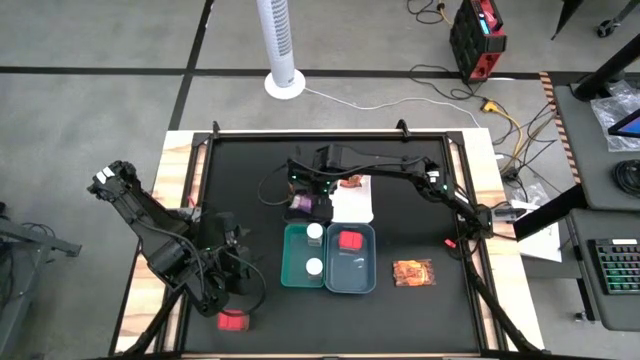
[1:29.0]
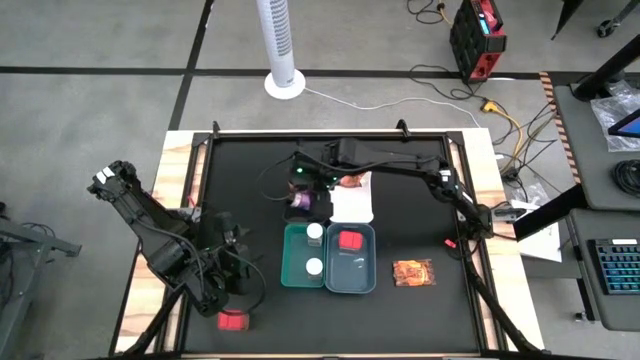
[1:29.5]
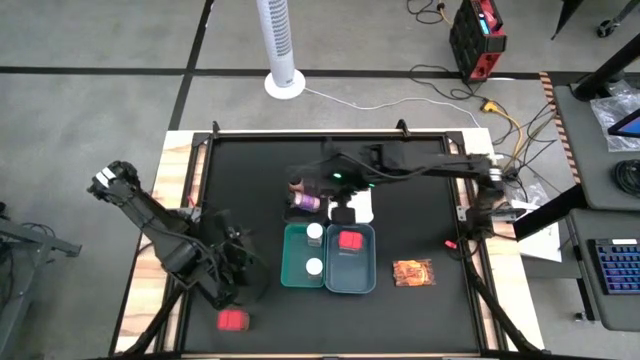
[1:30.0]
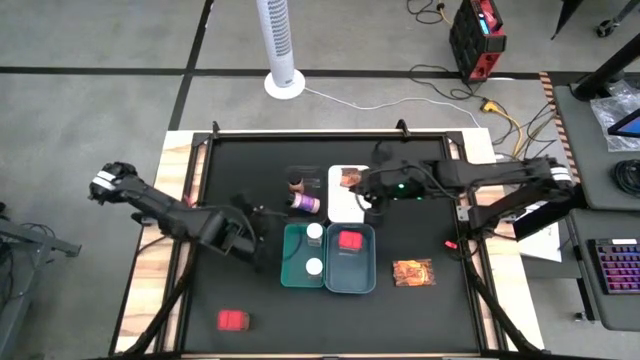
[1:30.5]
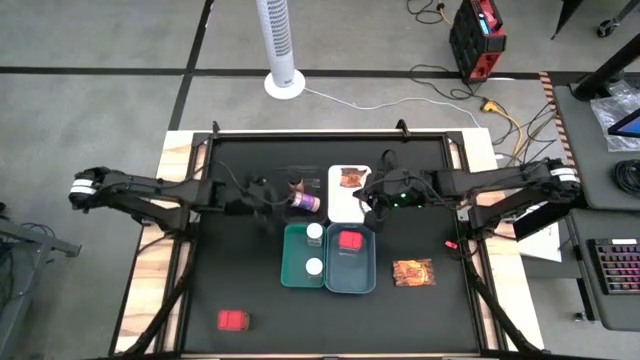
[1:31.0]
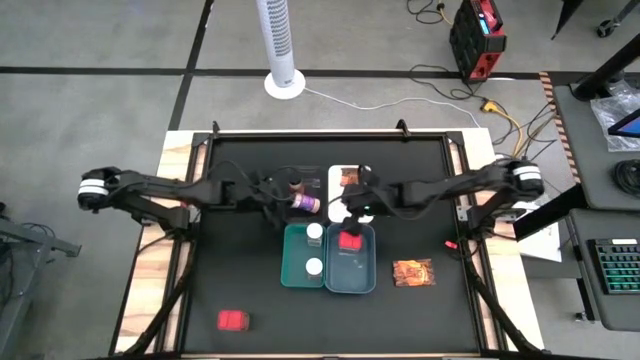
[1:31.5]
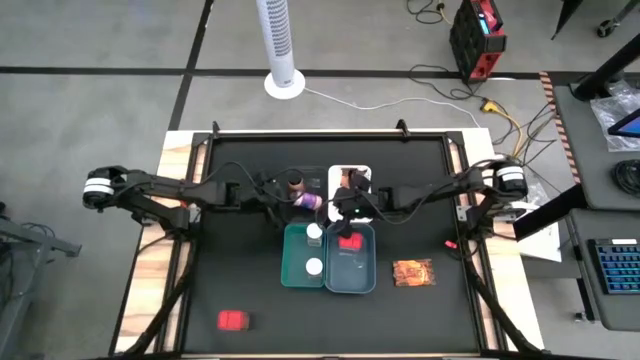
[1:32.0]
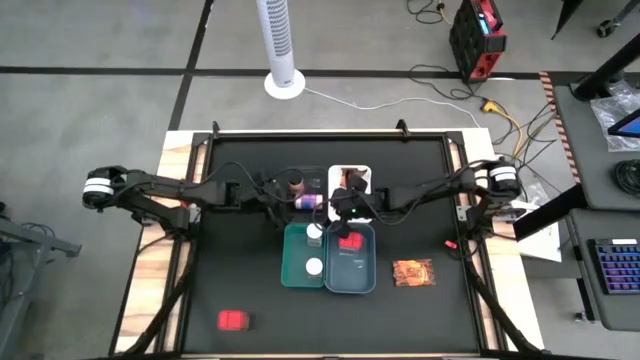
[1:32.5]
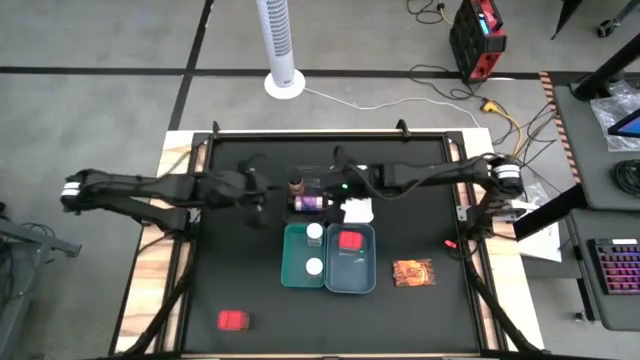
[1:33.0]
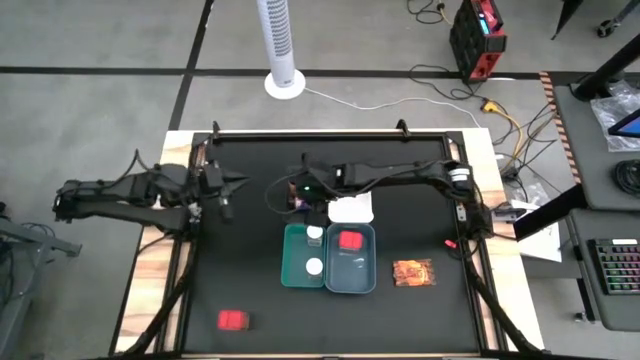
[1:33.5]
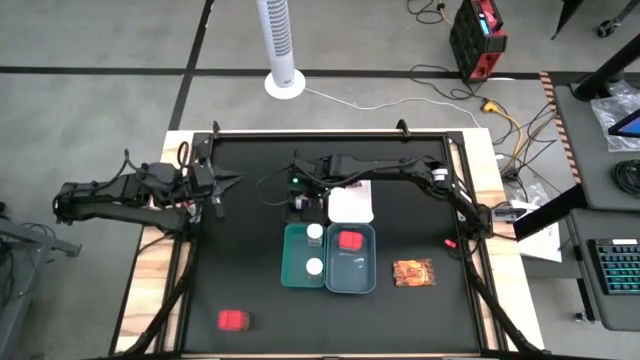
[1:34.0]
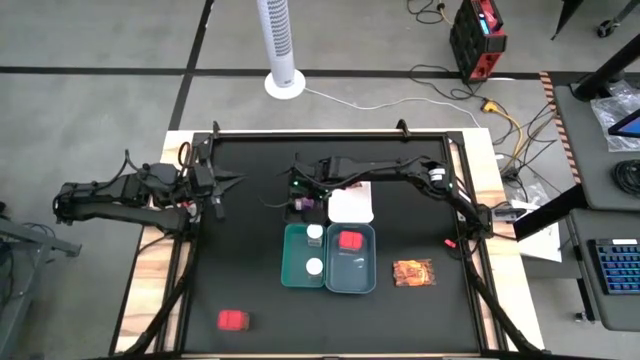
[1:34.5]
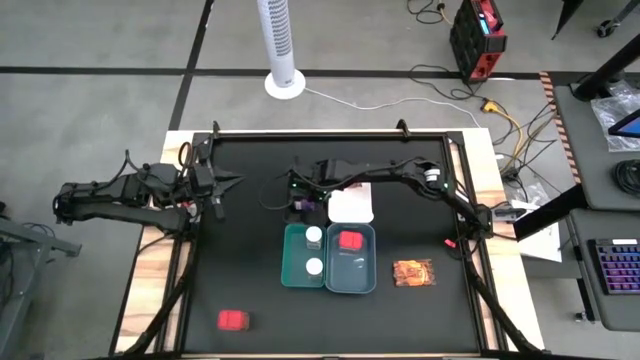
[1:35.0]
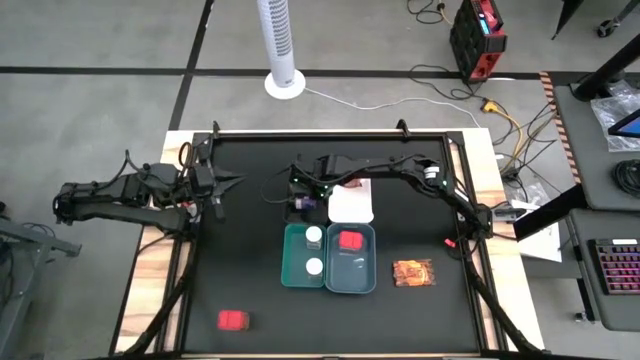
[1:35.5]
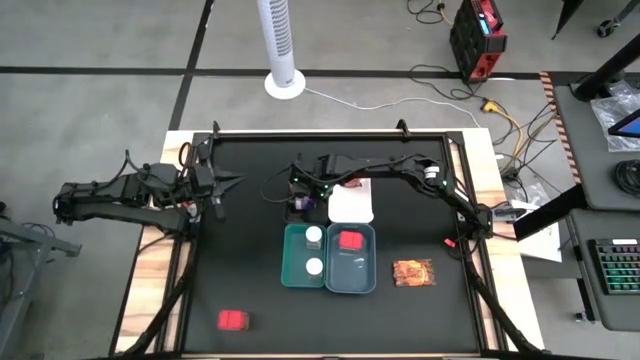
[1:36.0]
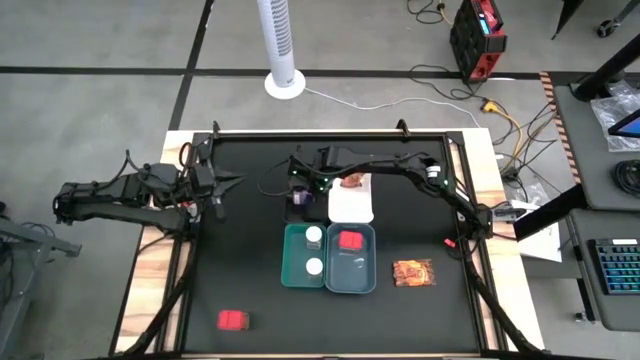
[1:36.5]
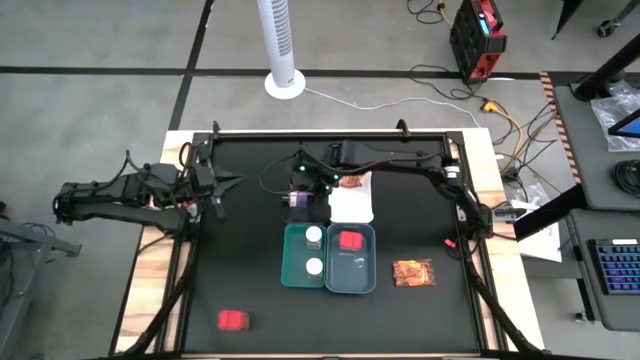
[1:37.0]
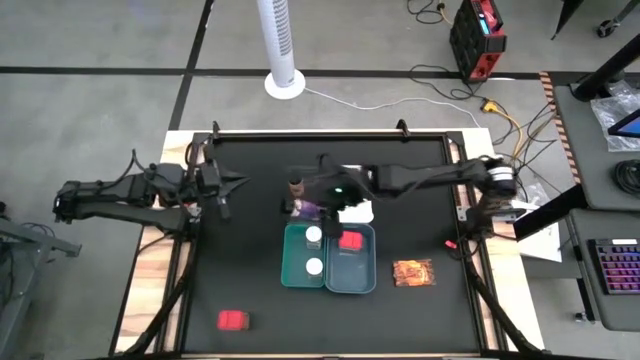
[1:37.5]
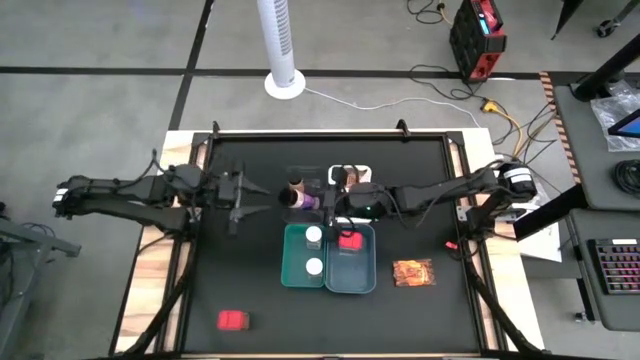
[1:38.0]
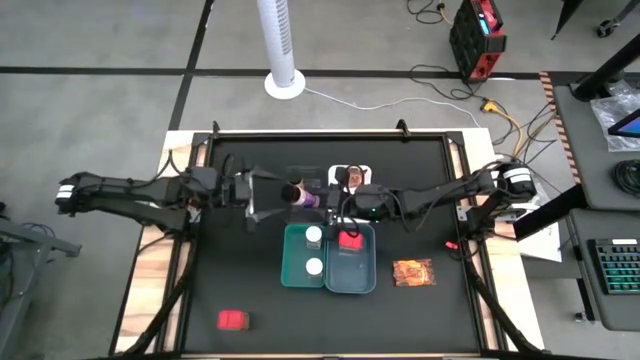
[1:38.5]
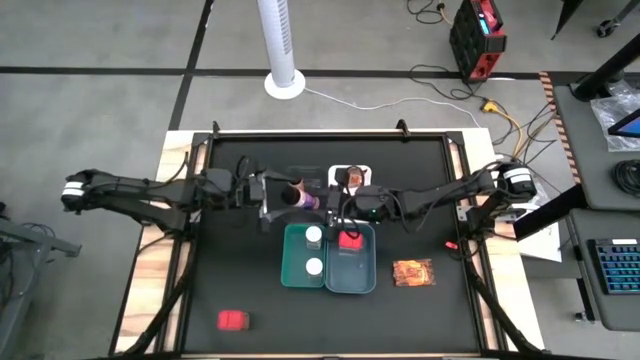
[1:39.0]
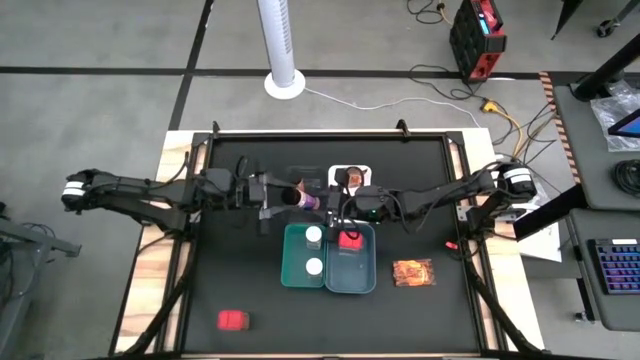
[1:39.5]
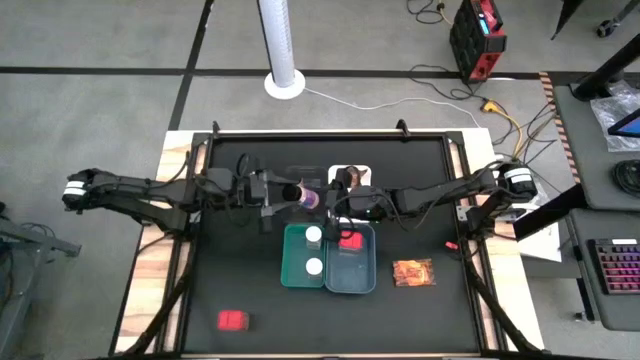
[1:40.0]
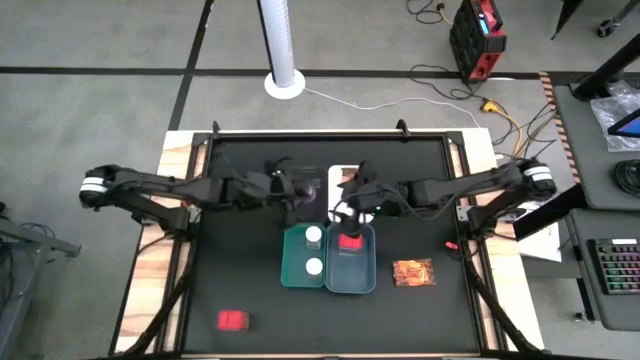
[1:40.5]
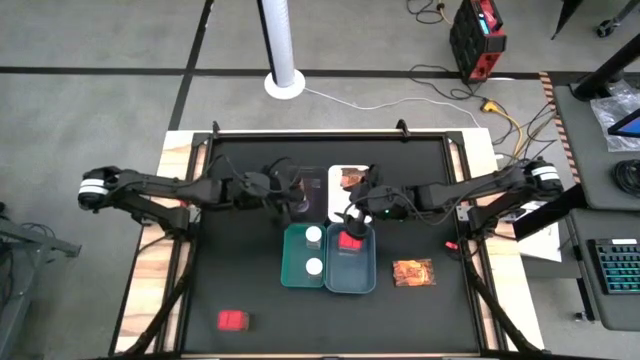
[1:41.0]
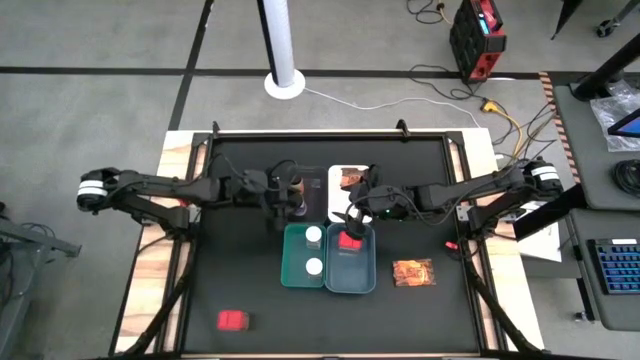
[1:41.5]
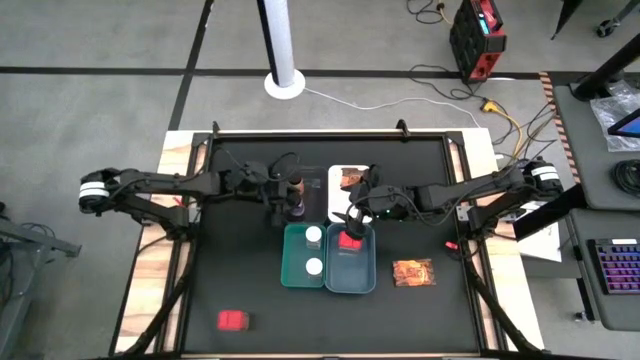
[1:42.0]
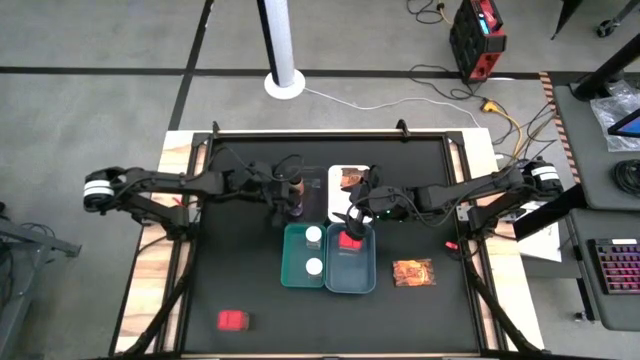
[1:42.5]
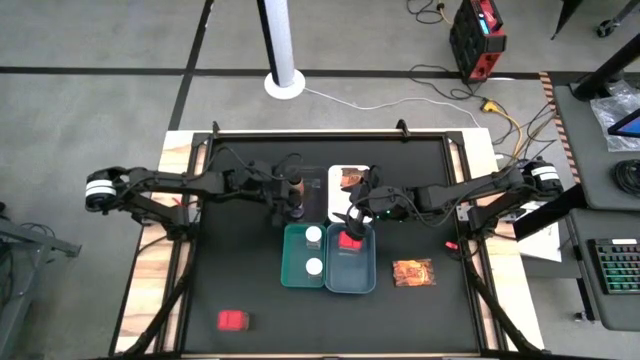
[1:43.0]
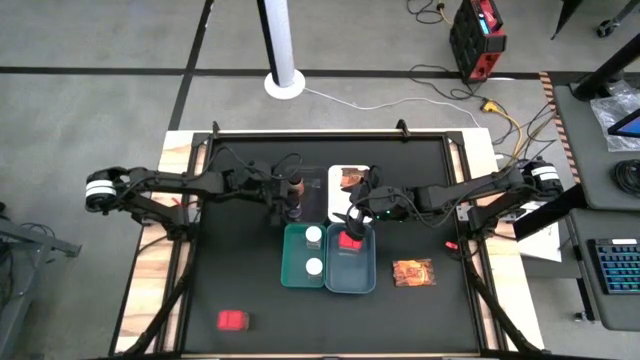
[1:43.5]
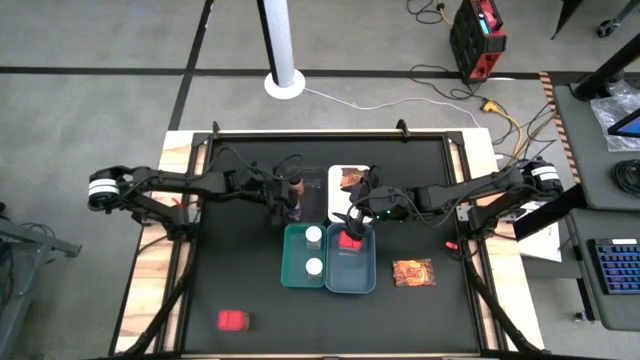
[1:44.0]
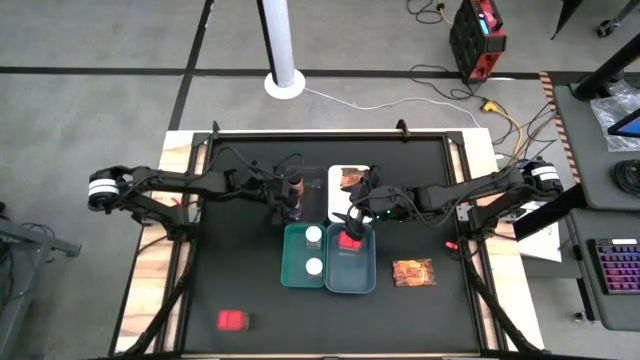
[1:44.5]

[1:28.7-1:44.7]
Task: Sort spices by type
Put the black seasoning bottle into the black bin

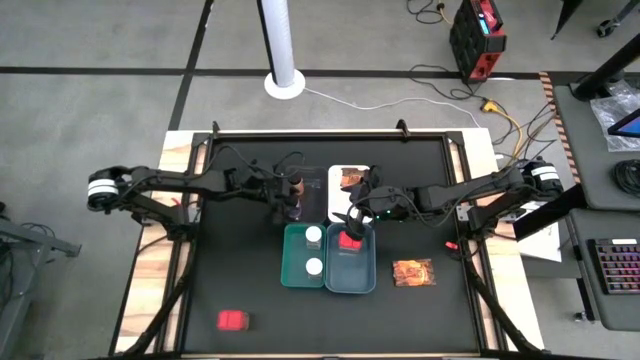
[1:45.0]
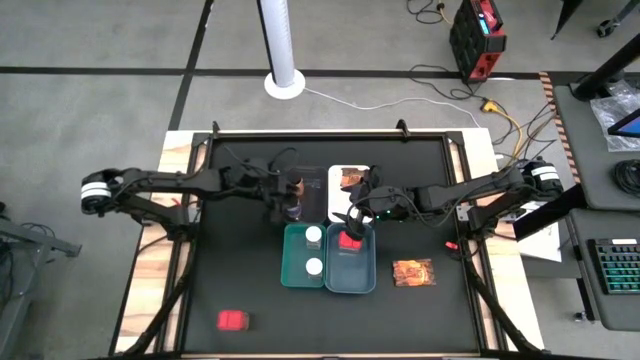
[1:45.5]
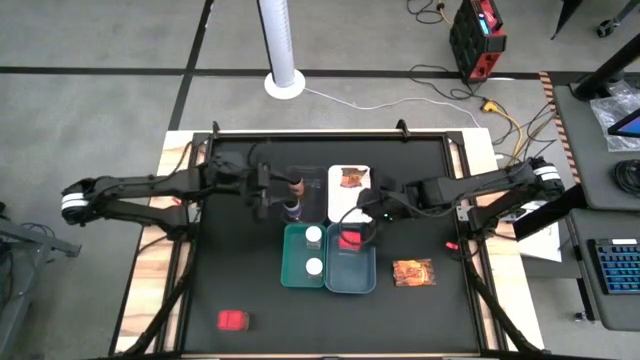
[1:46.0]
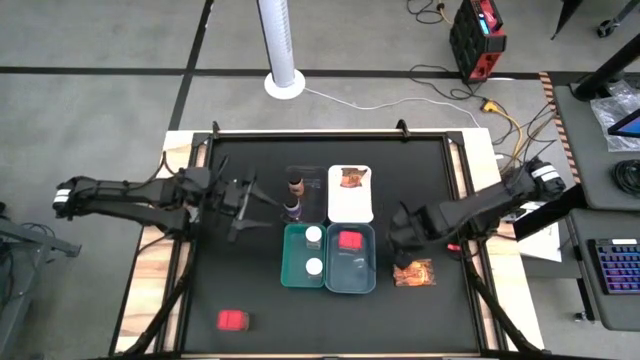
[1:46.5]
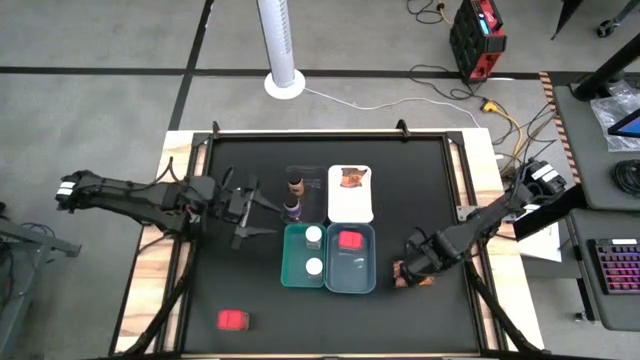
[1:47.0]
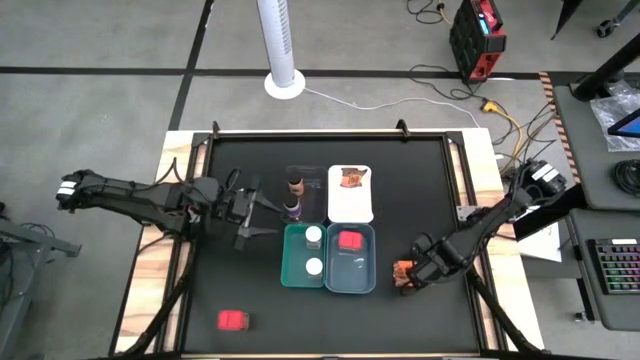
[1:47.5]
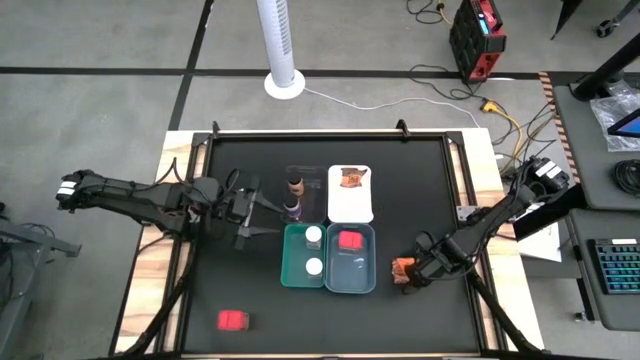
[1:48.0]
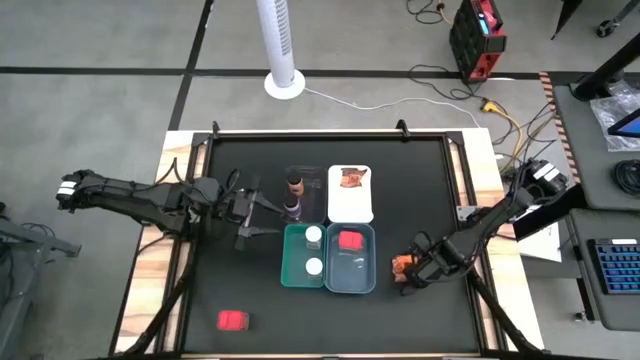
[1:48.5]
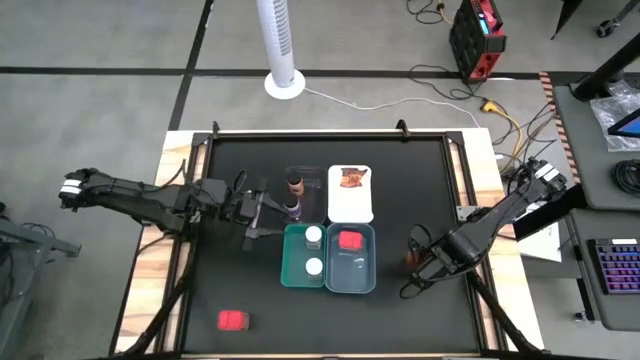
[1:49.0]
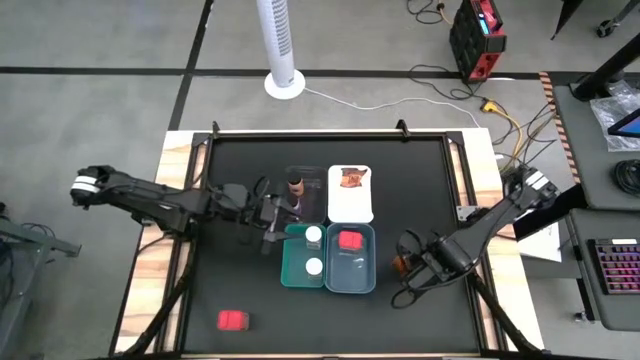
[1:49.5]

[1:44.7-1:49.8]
Put the orange seasoning pack into the white bin
